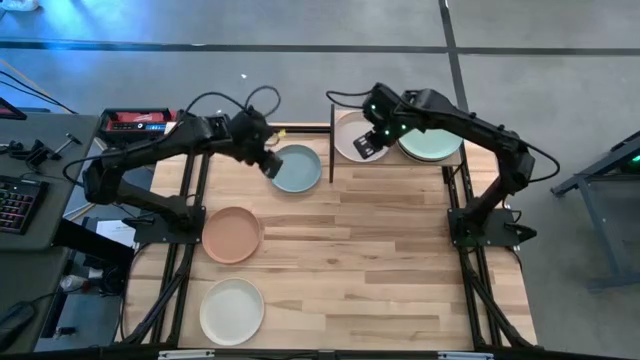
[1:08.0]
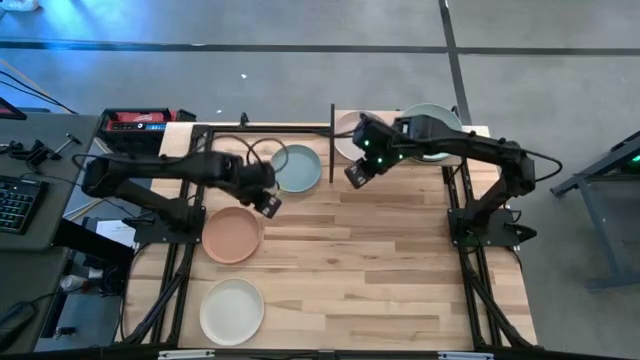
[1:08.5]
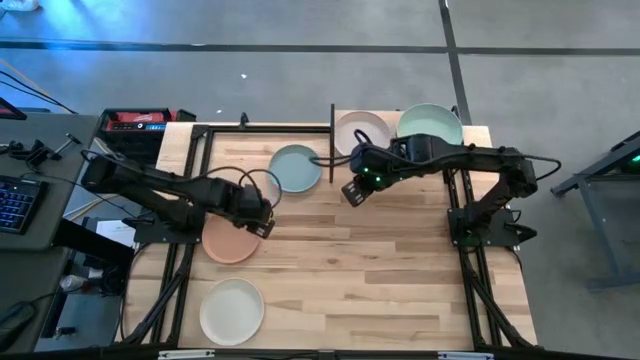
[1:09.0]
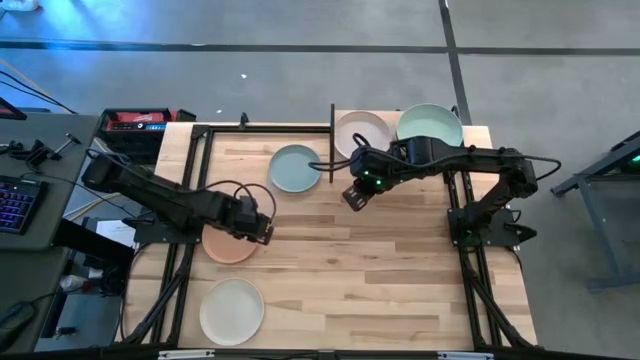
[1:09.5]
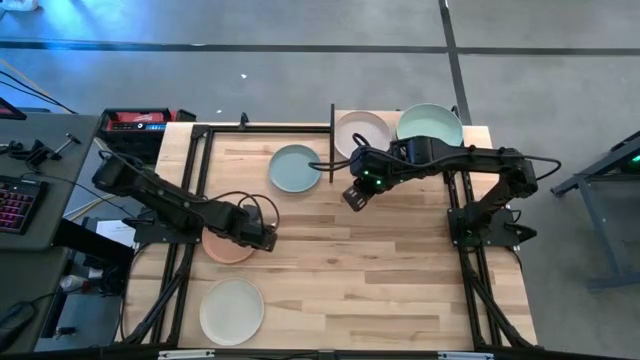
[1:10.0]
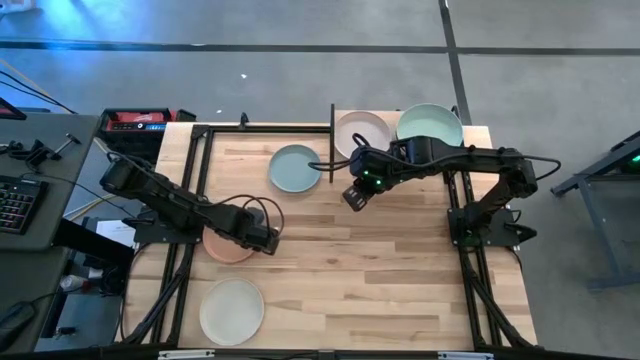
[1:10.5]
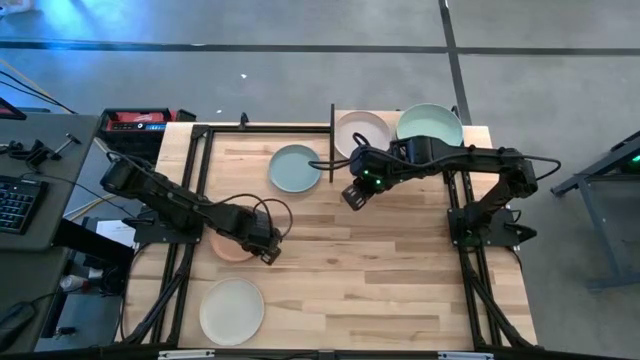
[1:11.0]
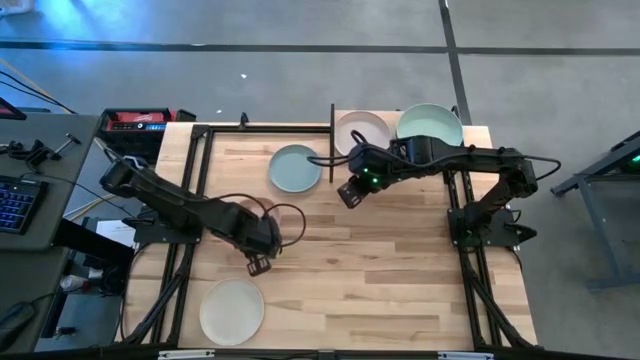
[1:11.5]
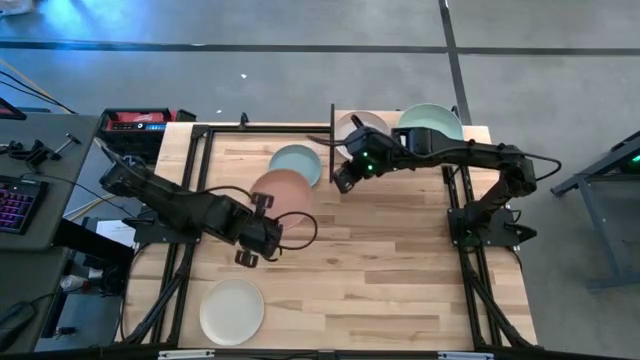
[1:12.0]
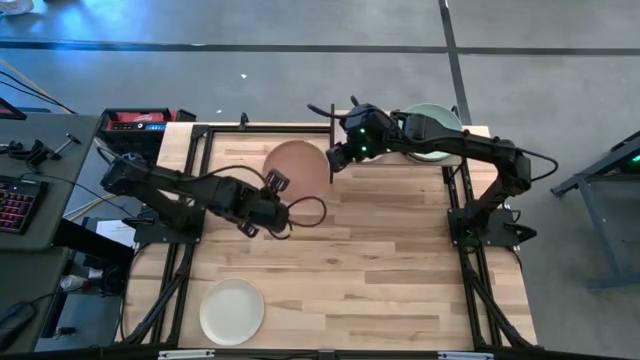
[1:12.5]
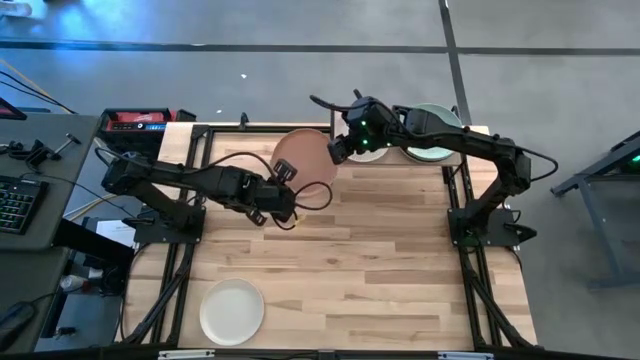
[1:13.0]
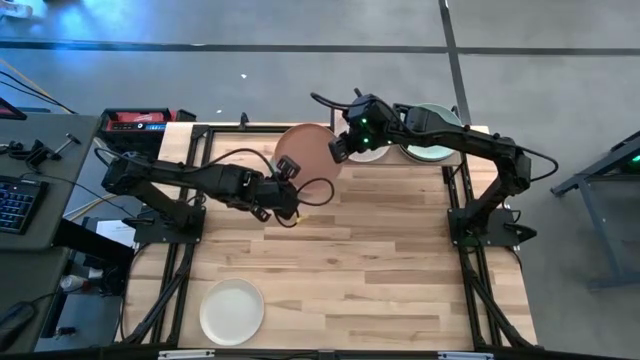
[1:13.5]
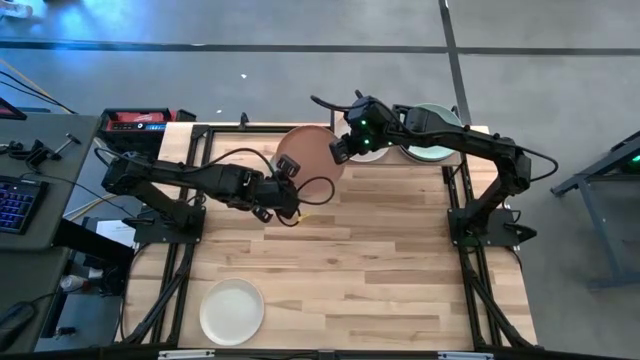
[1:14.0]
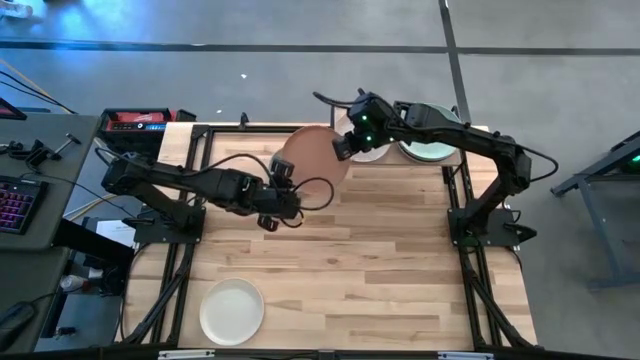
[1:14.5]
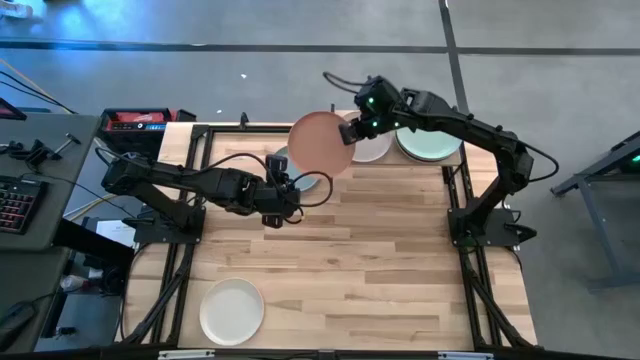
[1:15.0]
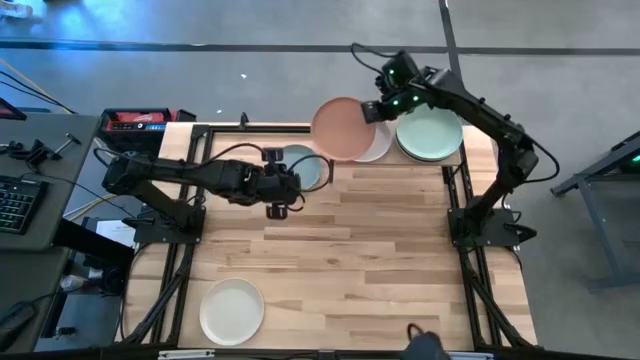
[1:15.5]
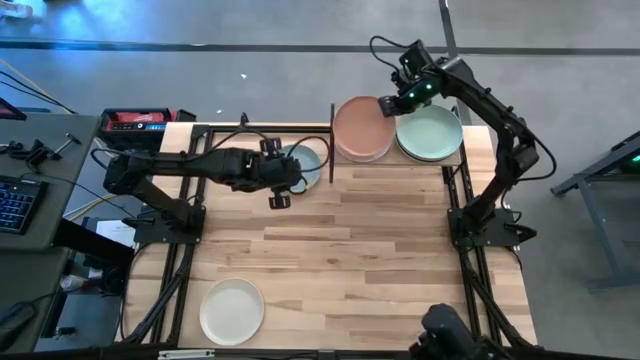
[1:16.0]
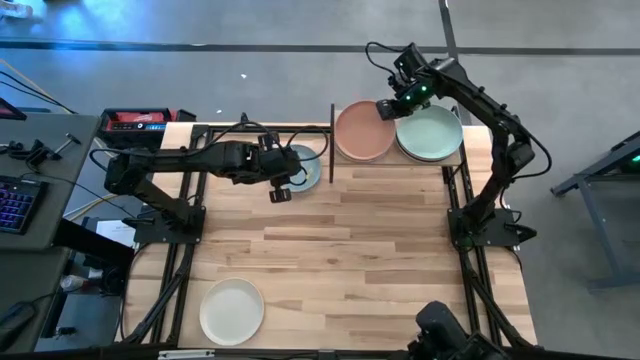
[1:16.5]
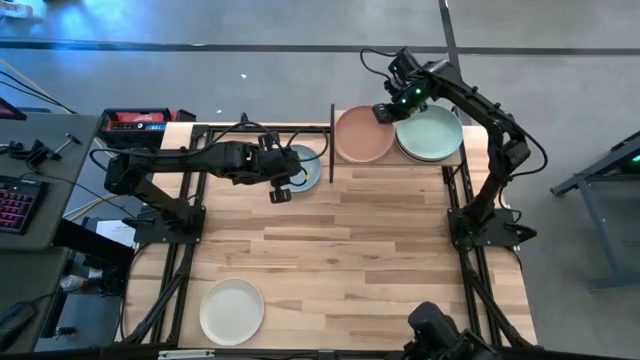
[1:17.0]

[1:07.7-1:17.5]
Task: Place and stack plates onto a shelf
Stack the brown plate on the top of the white plate on the shelf

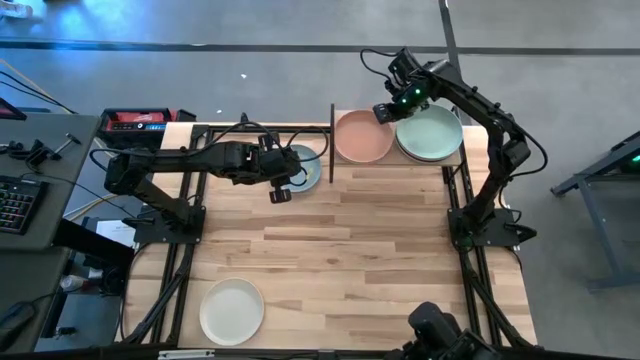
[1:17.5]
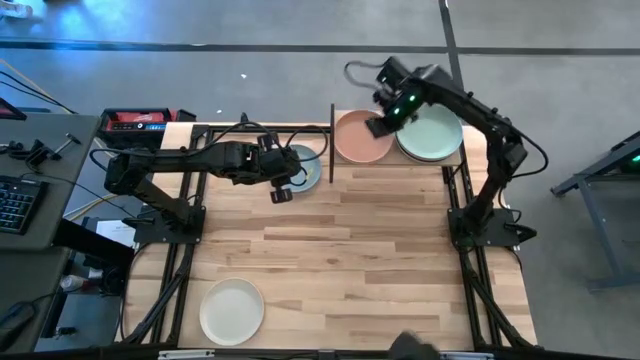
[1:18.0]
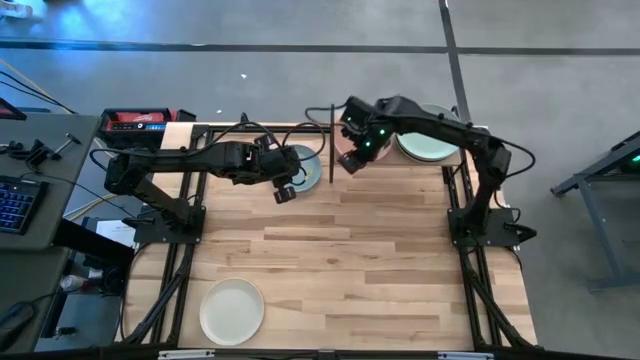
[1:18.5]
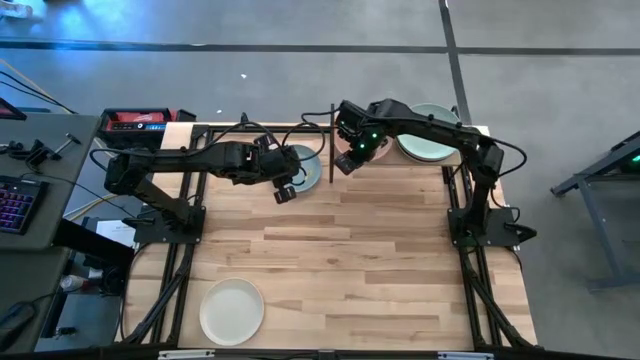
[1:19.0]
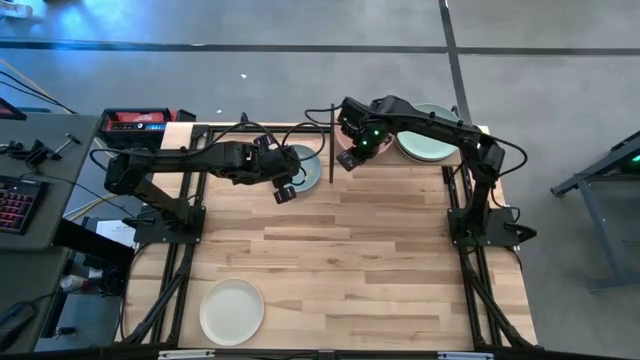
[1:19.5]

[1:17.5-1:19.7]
Adjust the left stacked plates on the shelf

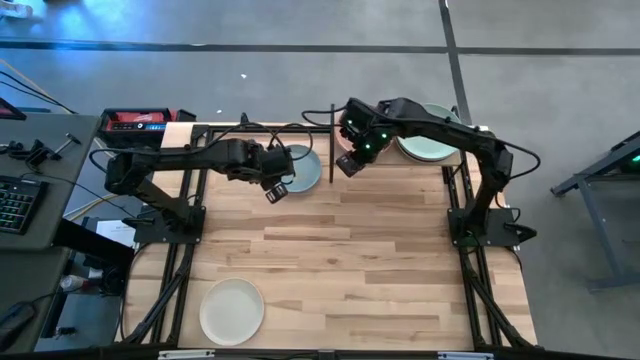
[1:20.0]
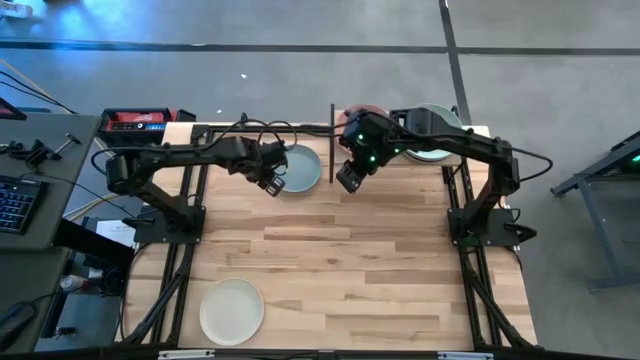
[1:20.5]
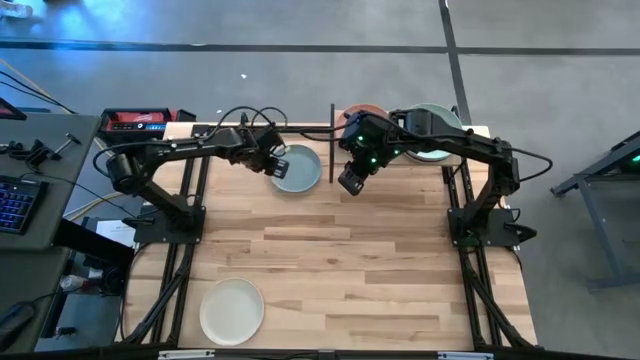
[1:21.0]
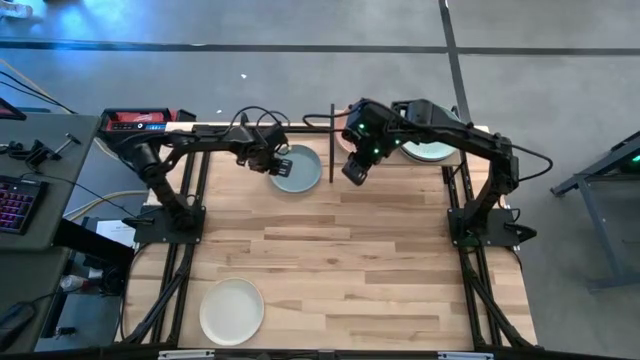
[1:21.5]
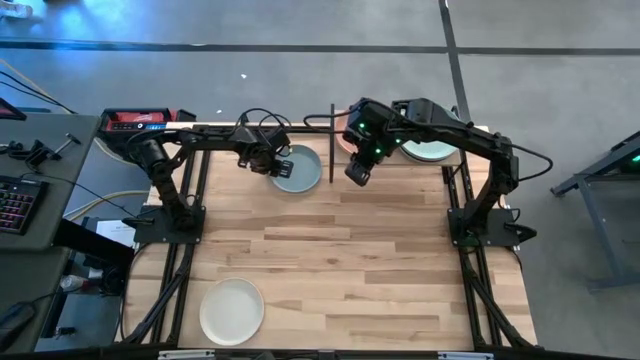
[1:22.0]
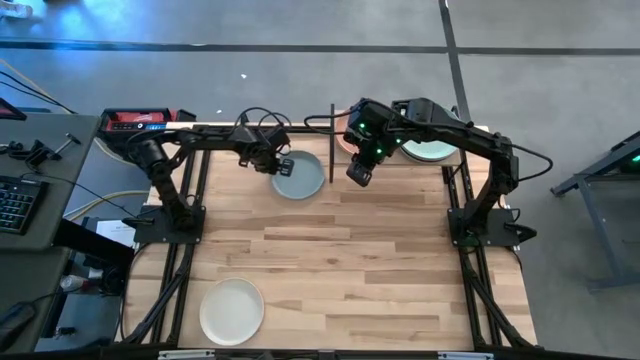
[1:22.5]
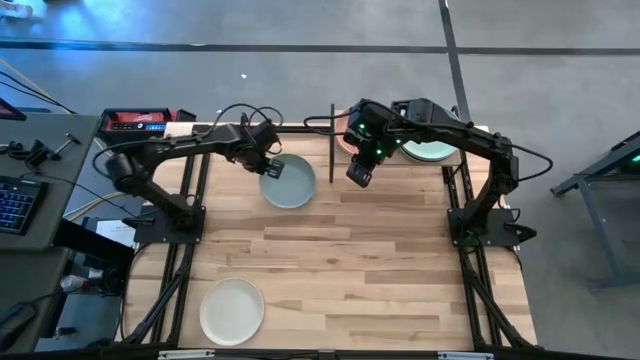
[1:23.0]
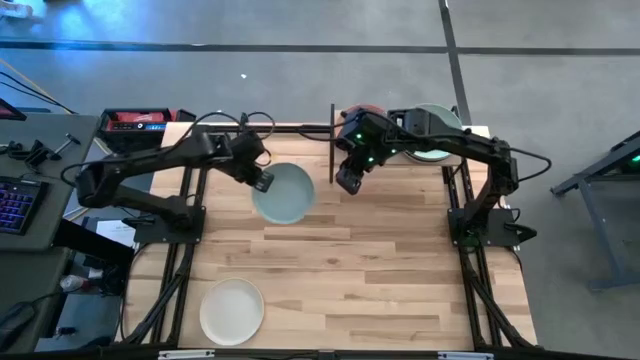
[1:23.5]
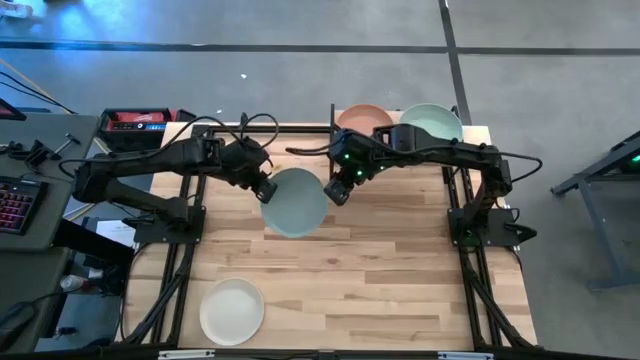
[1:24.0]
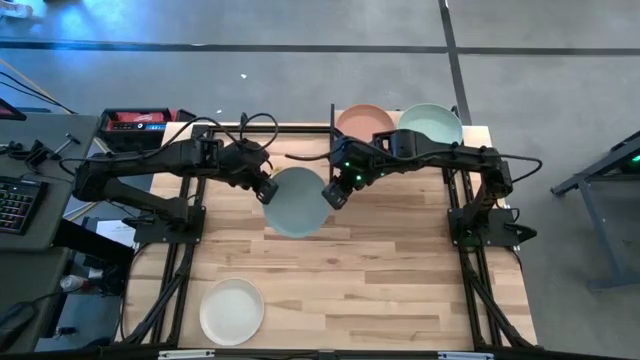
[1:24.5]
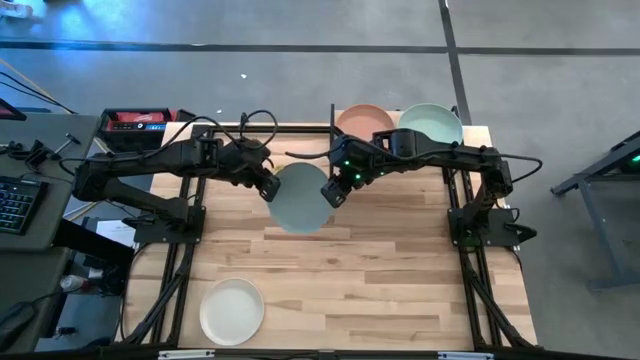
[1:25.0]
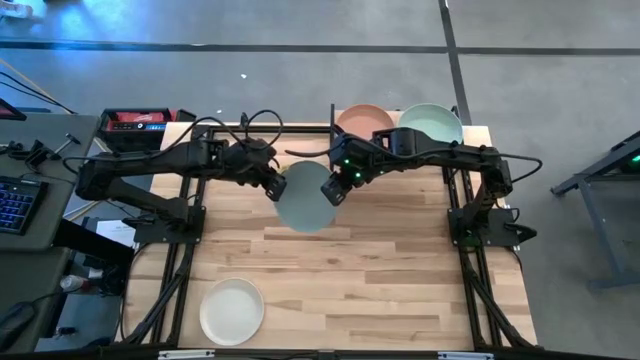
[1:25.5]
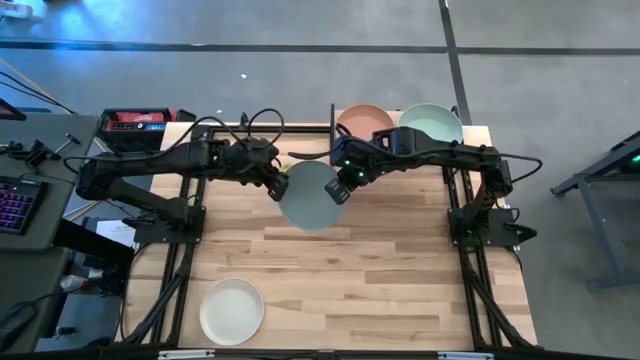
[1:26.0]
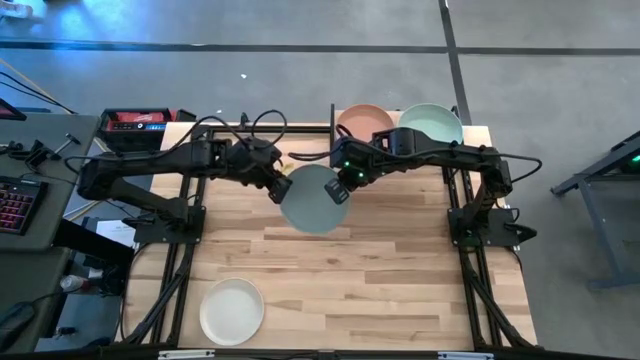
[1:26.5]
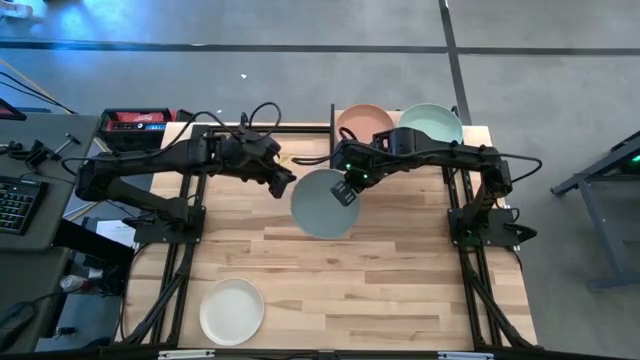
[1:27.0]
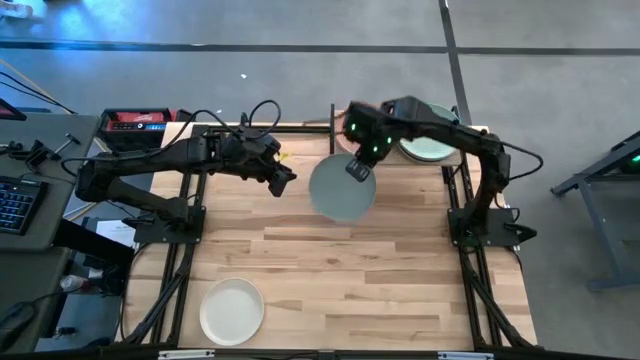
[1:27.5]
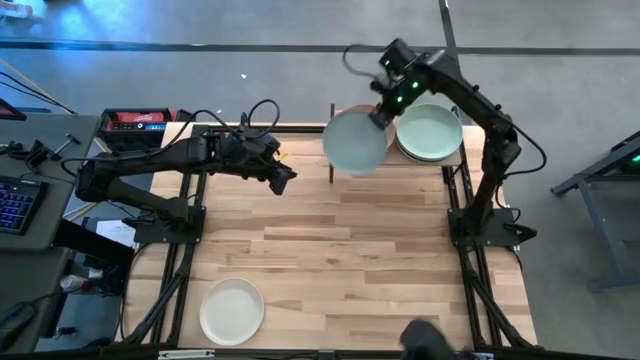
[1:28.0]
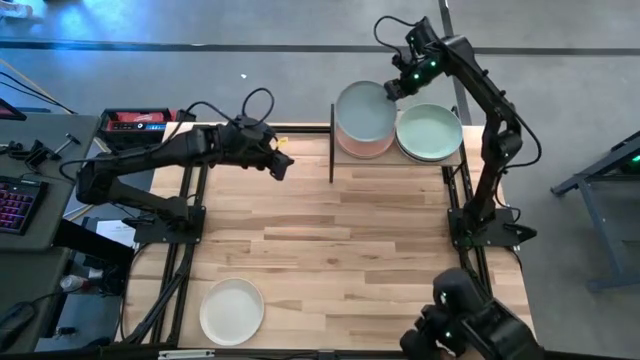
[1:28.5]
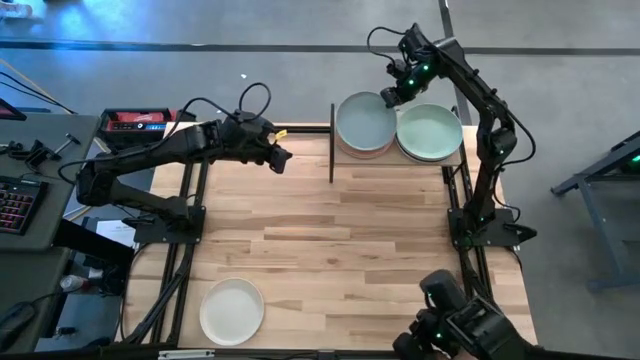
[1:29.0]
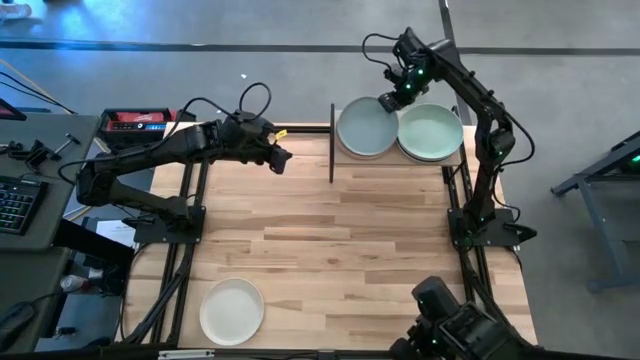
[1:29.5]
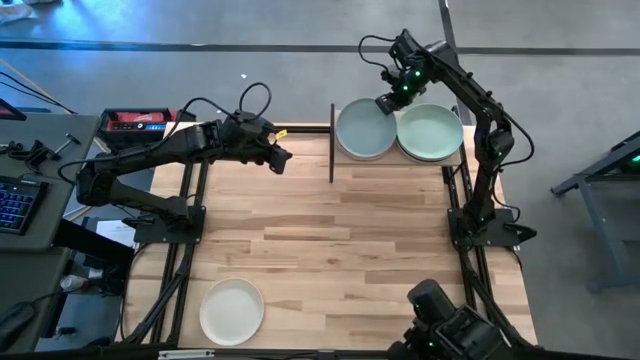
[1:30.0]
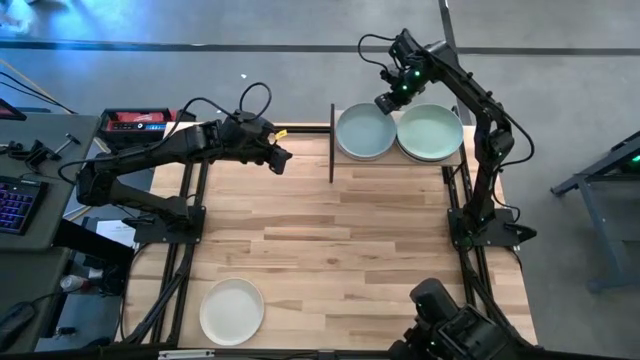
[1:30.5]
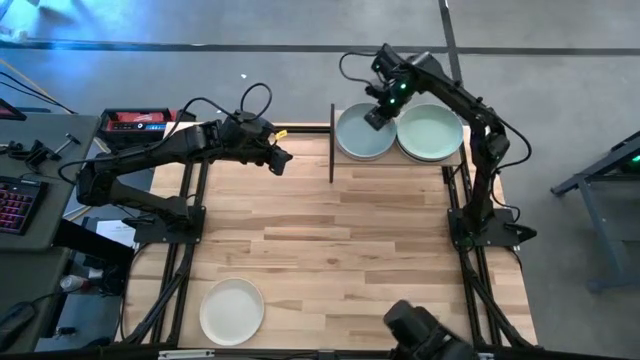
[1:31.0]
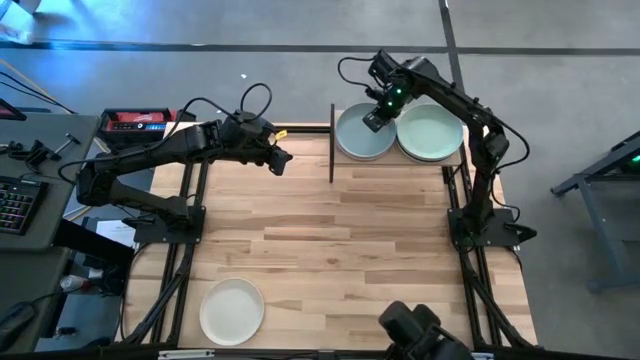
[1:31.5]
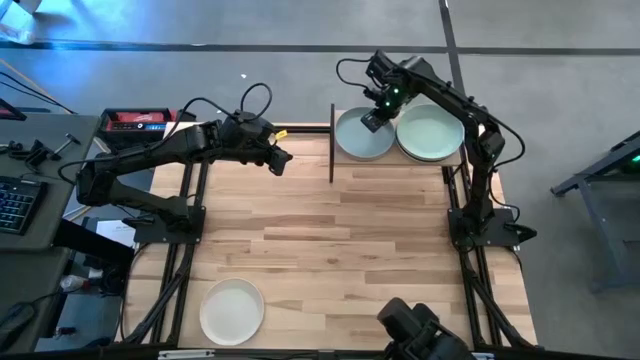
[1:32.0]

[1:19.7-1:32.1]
Stack the blue plate on the top of the brown plate on the shelf
